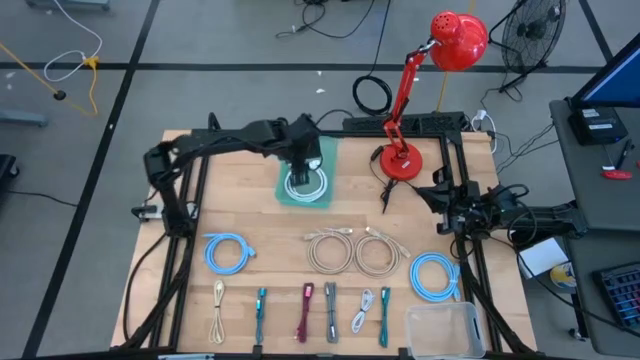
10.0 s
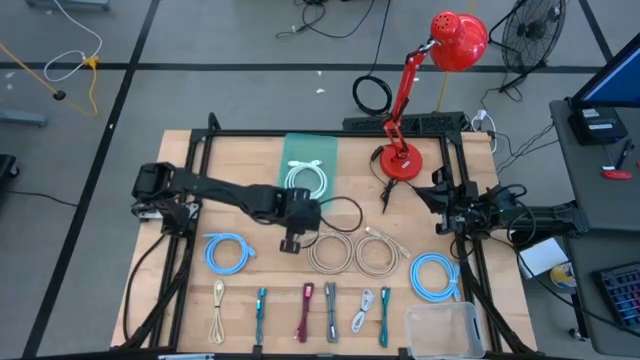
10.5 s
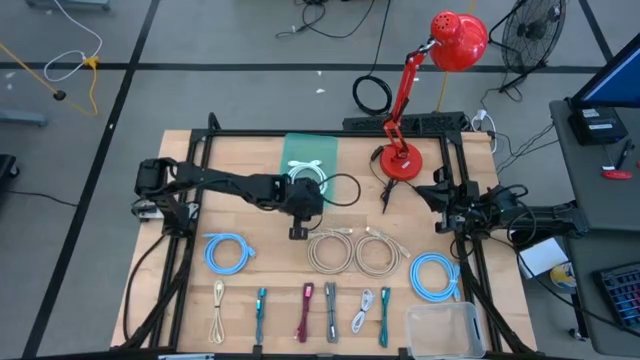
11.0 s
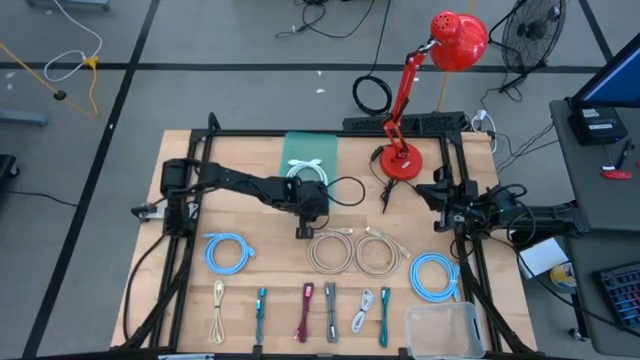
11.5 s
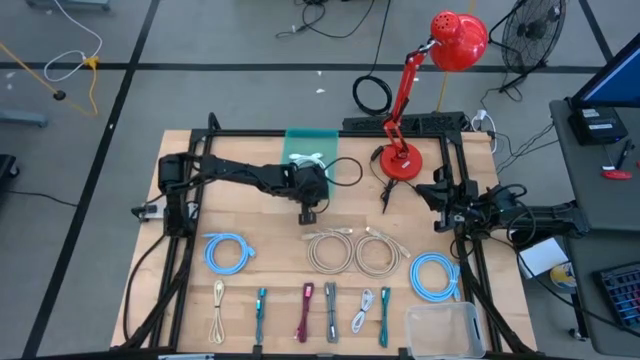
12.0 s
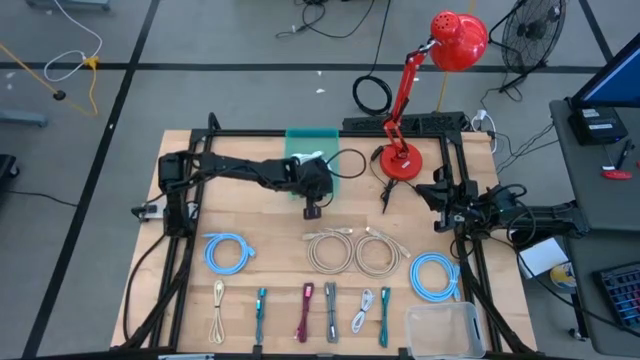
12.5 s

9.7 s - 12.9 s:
Task: Pick & Place USB Port
Adjust the green bin on the table

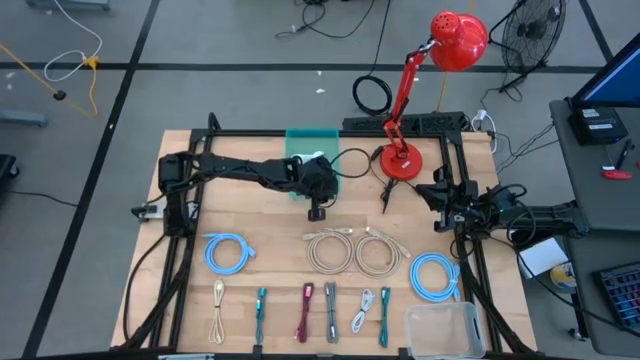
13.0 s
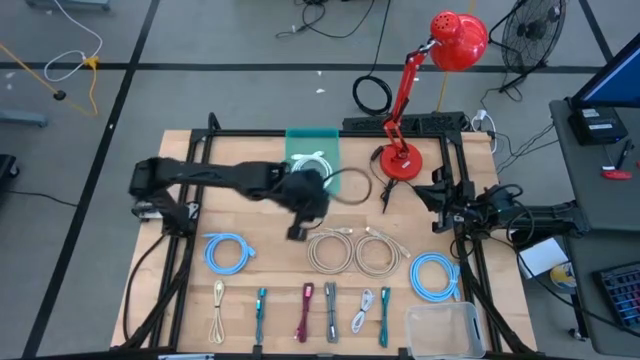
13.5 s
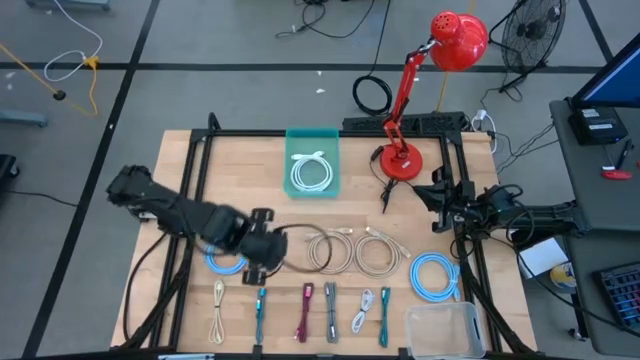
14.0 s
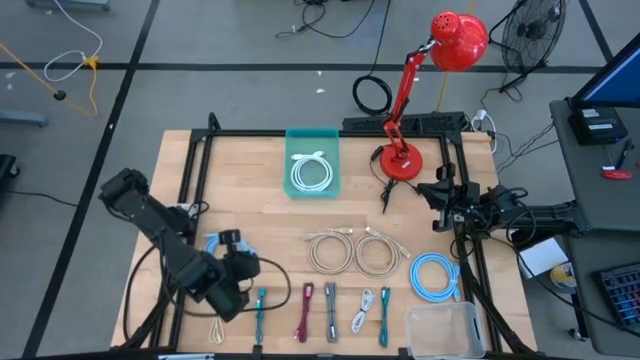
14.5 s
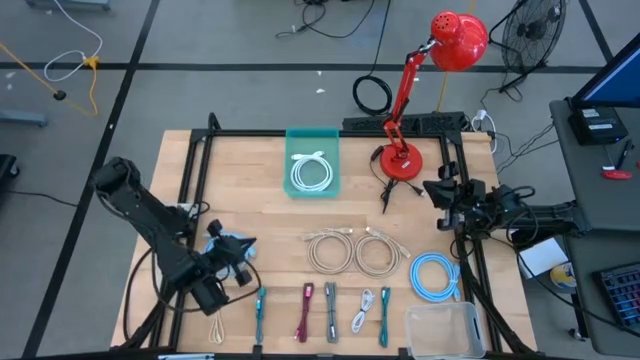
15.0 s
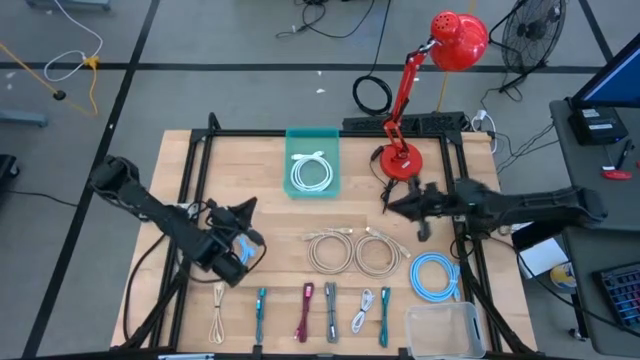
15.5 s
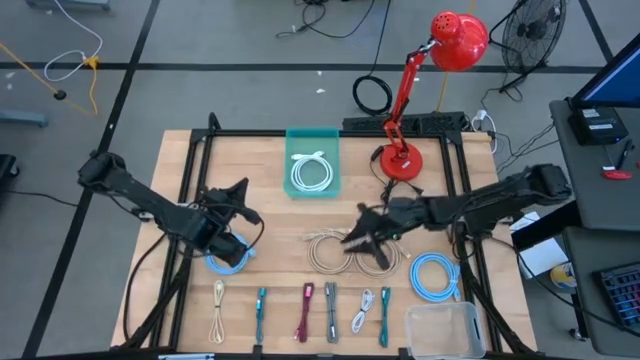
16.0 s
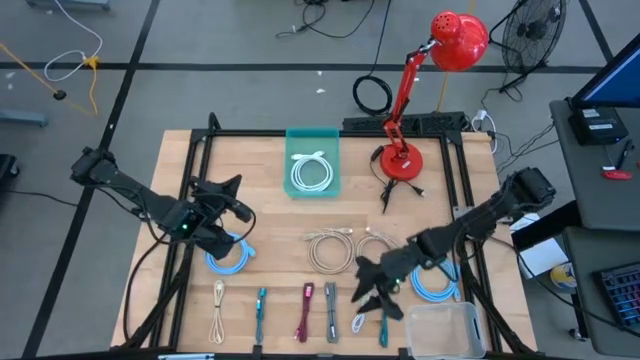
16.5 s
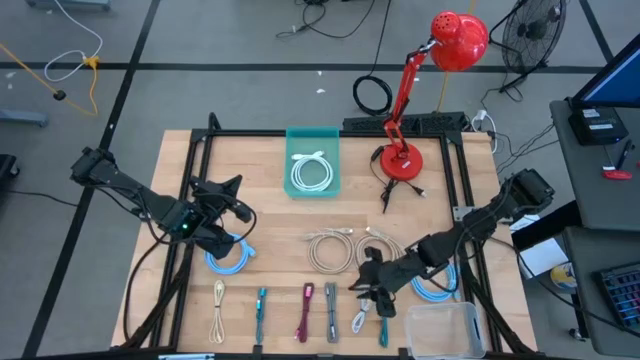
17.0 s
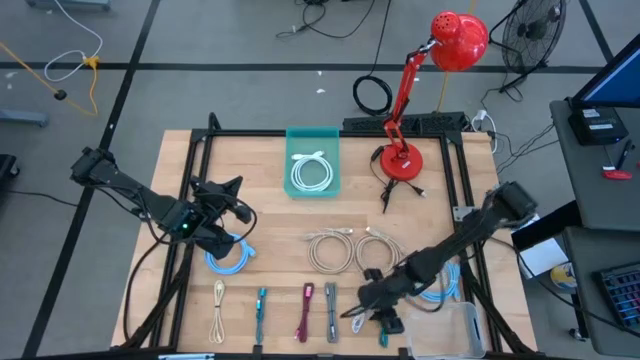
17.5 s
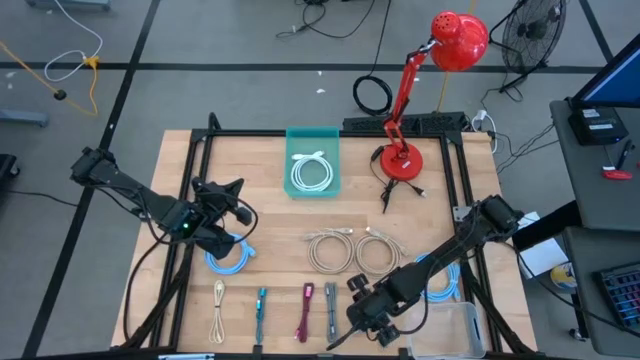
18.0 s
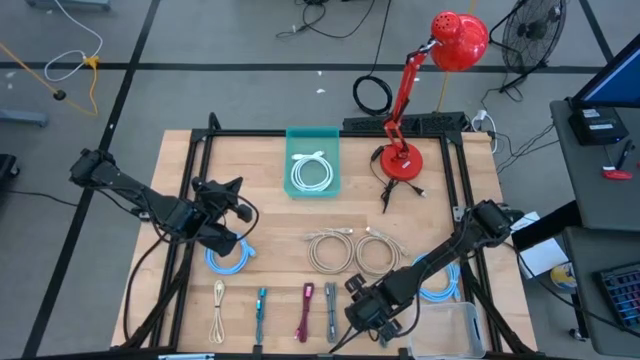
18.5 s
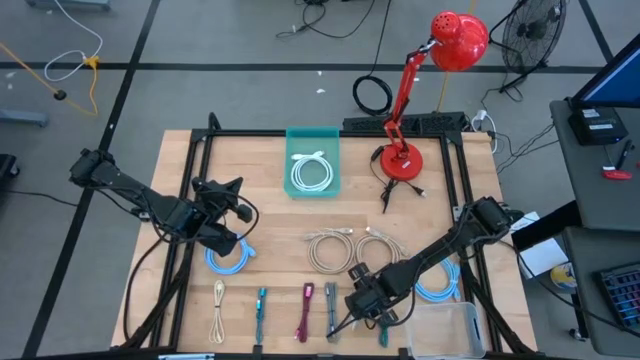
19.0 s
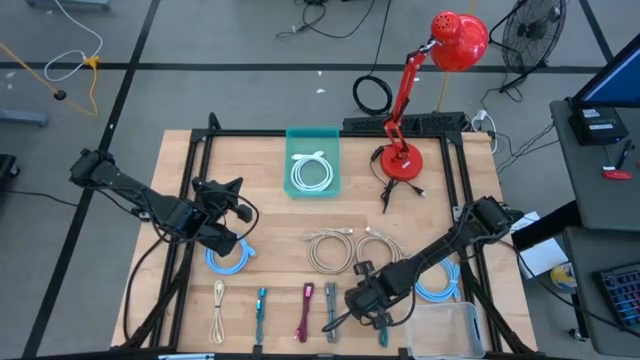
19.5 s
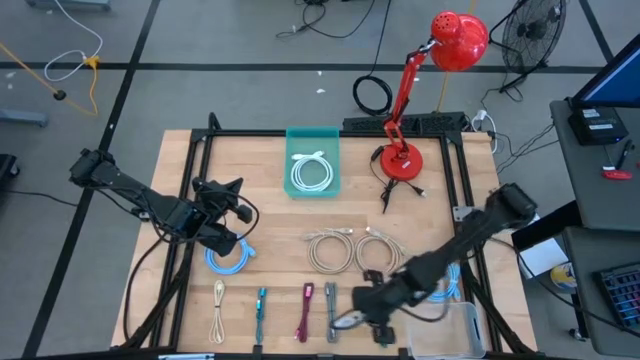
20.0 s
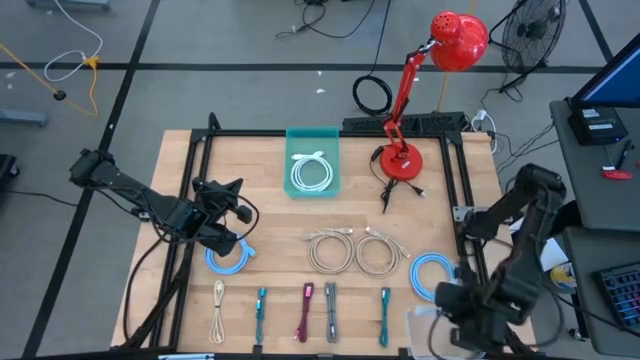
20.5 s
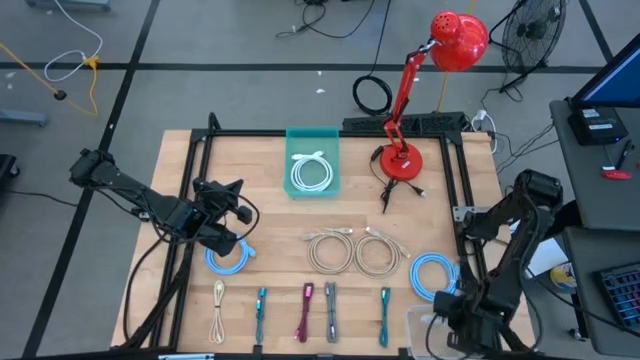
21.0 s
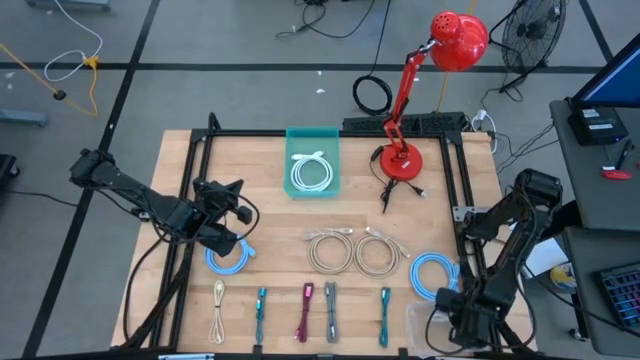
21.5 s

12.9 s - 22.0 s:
Put the white USB cable into the transparent bin

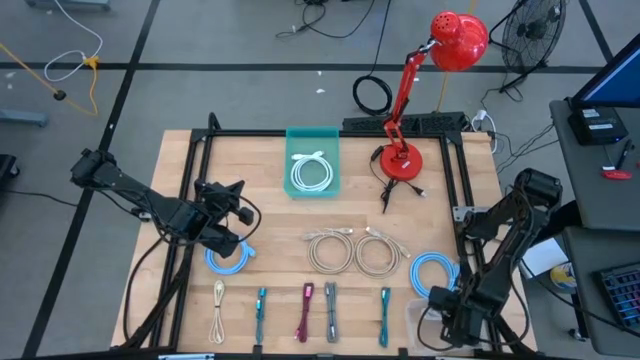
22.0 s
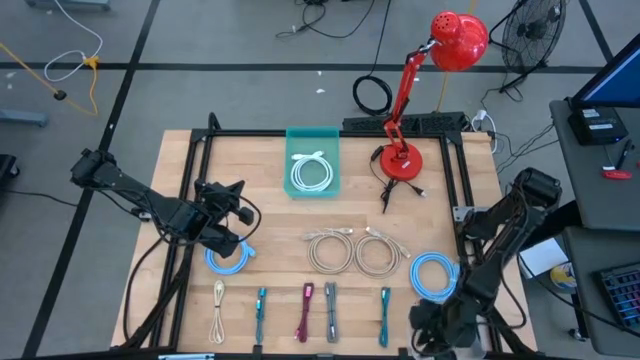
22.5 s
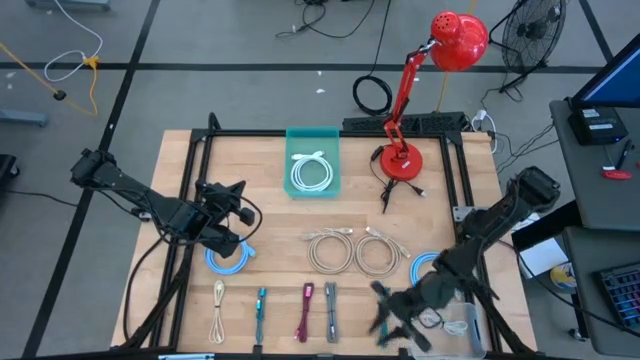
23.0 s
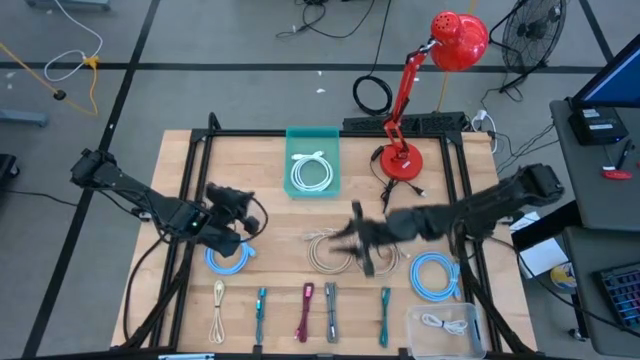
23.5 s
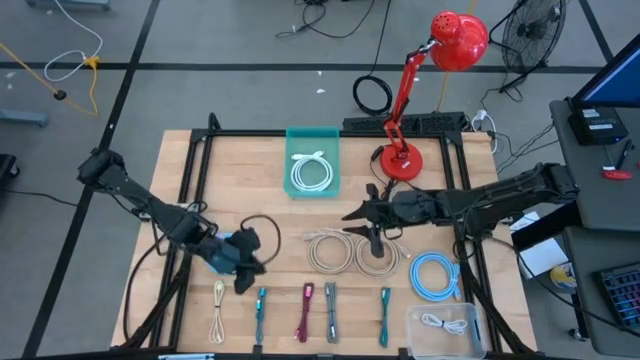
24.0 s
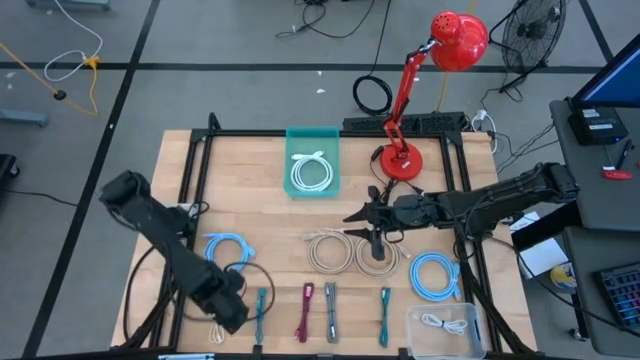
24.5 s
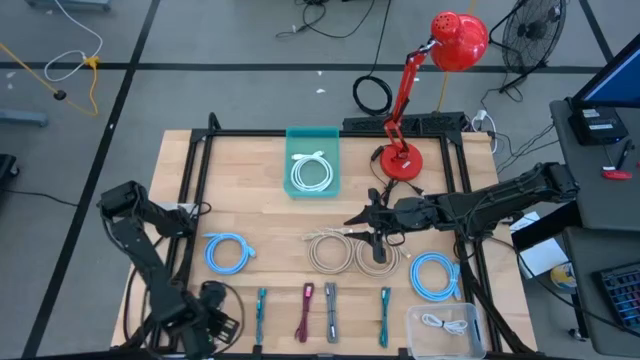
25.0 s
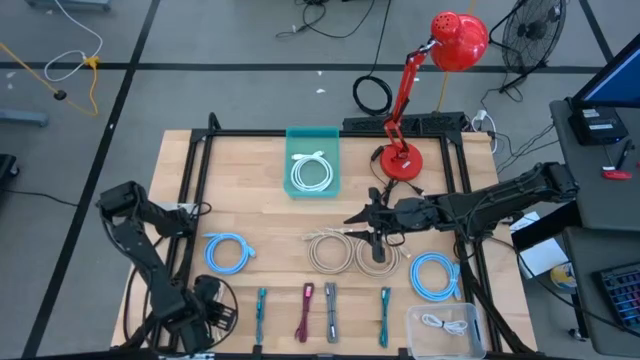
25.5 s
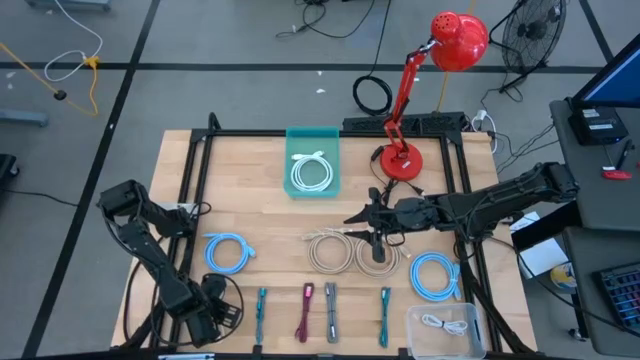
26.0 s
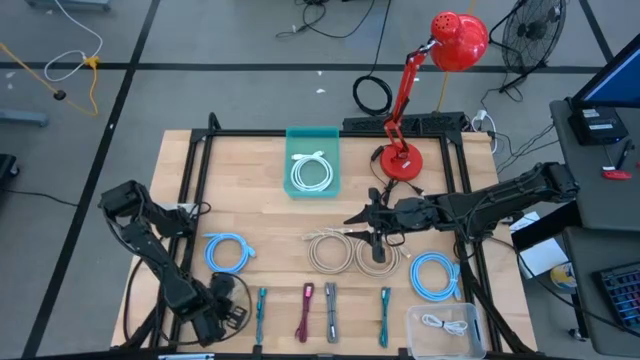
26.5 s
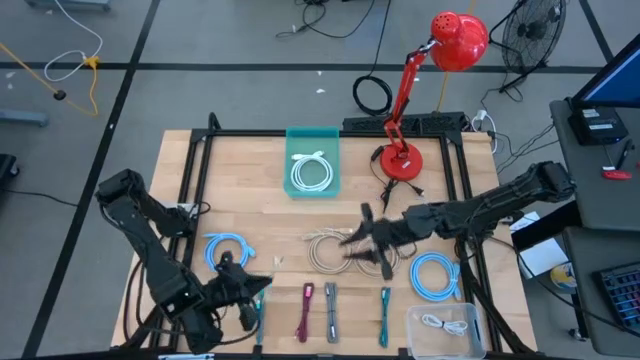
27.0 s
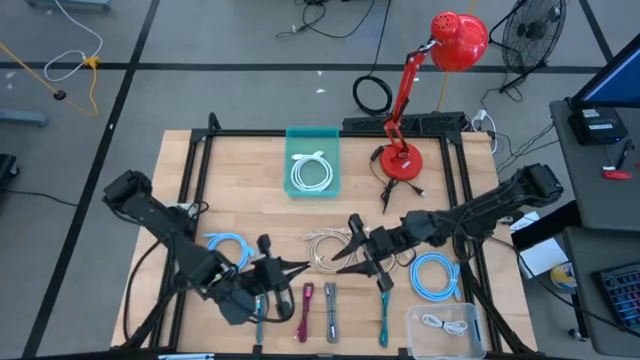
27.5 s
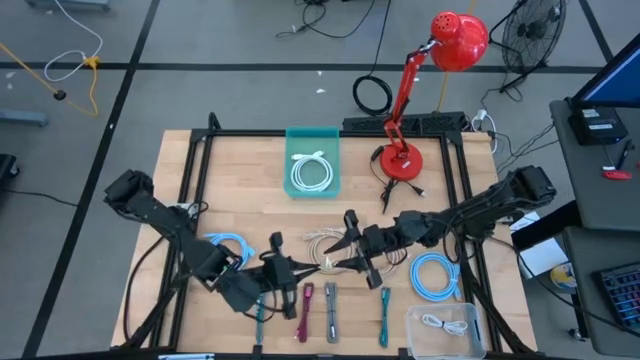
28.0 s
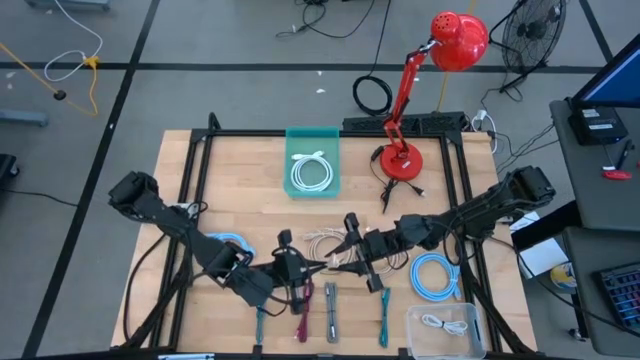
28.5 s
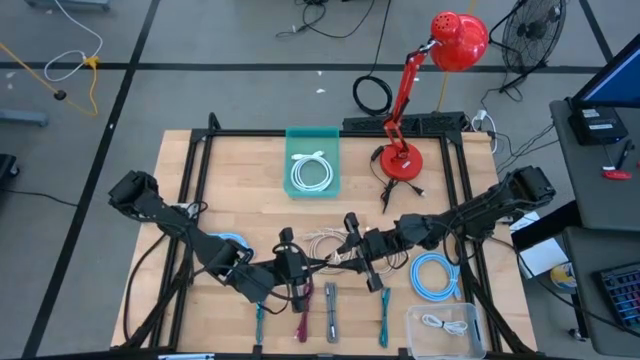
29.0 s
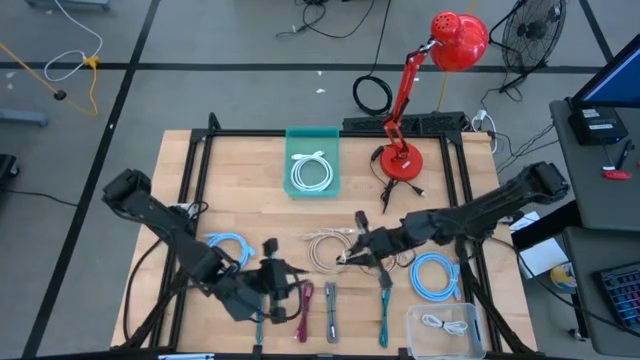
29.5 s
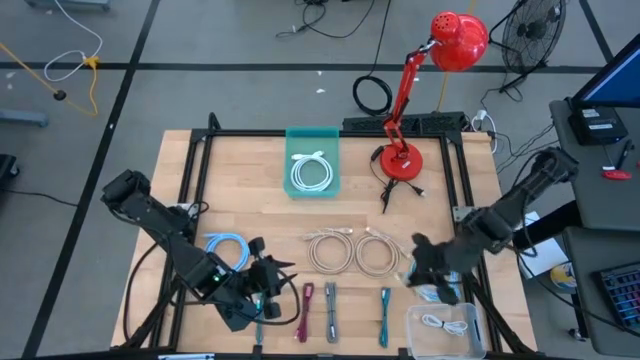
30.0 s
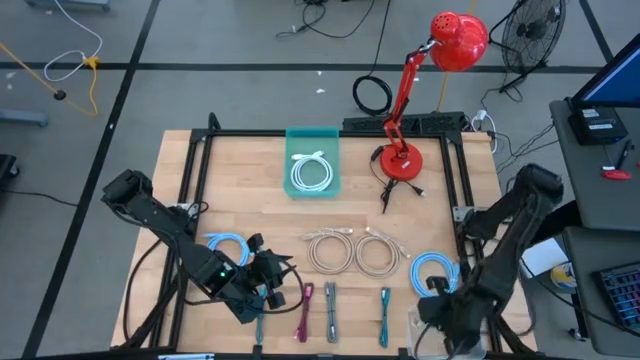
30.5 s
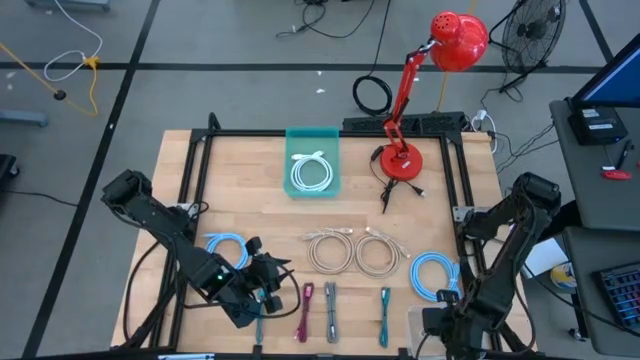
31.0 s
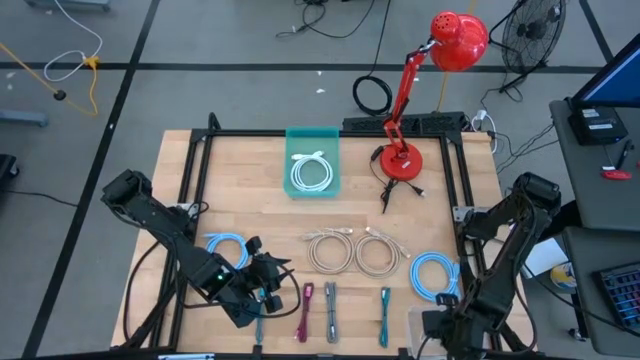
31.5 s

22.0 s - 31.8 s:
Put the brown USB cable into the transparent bin
